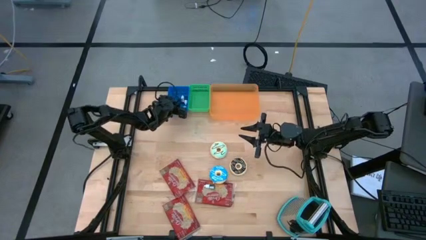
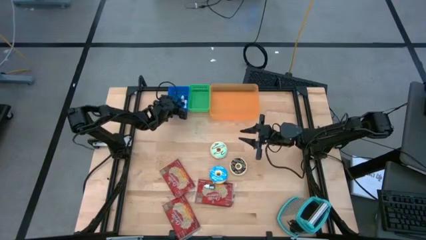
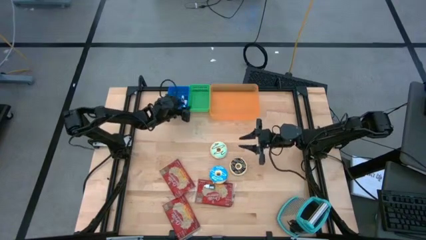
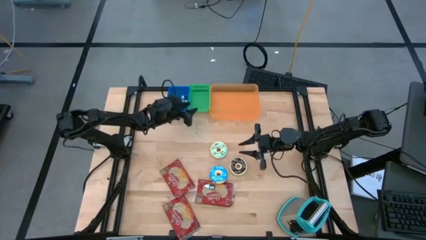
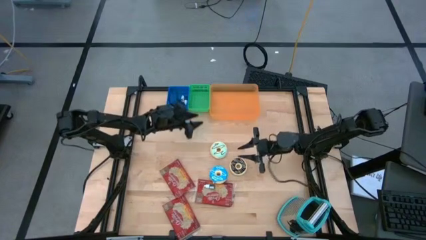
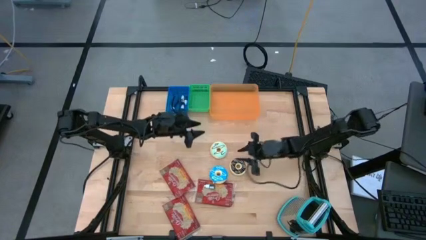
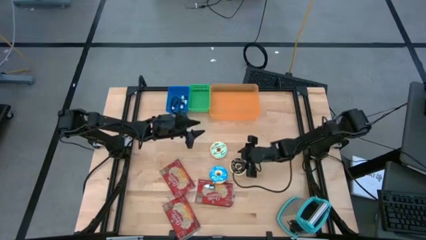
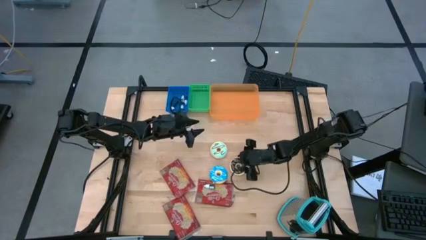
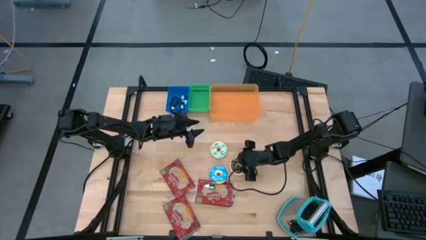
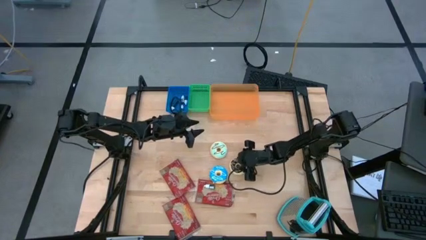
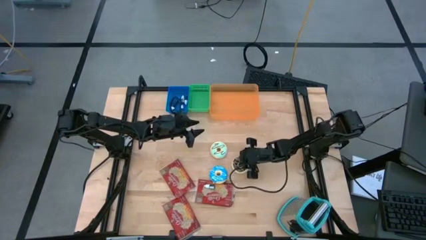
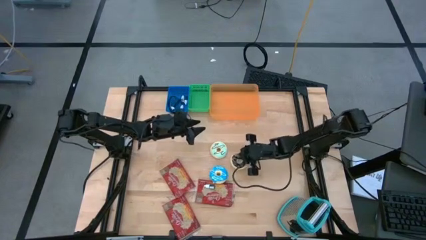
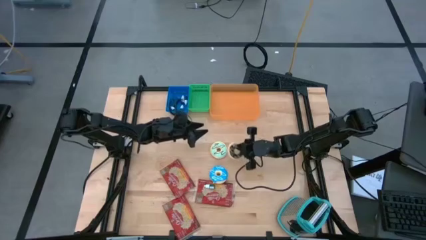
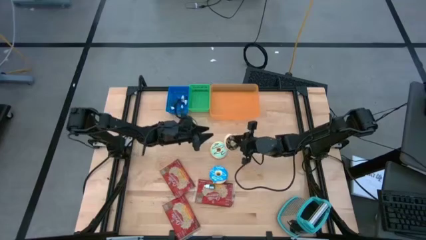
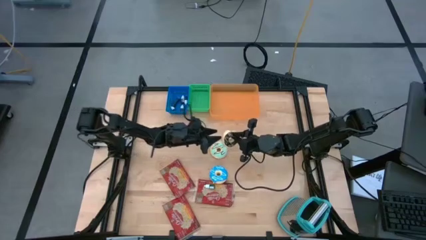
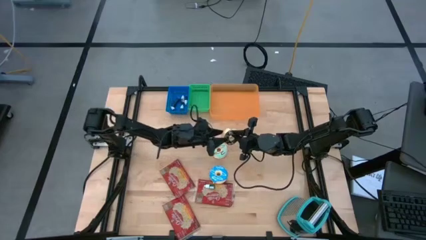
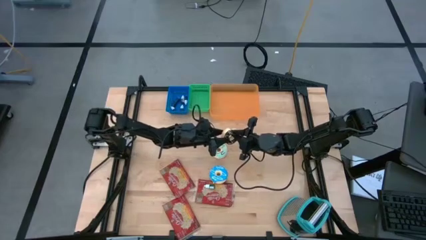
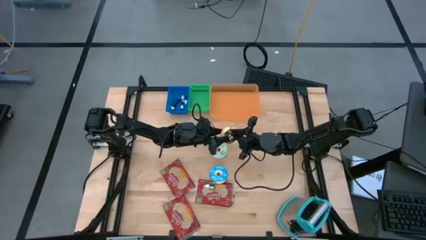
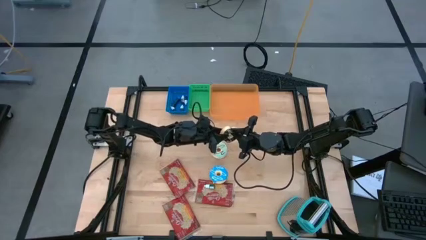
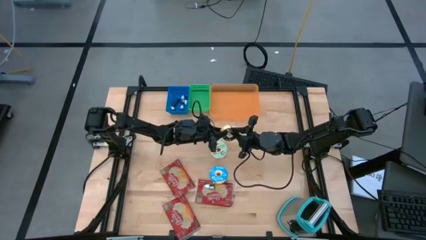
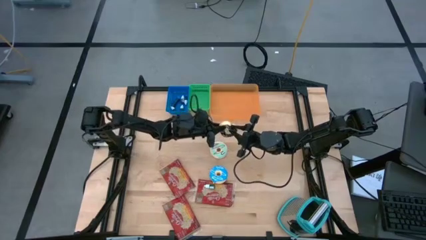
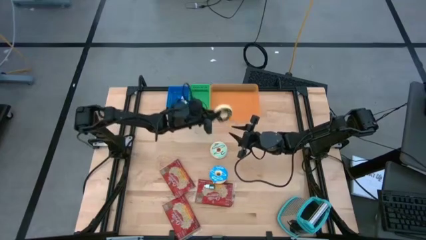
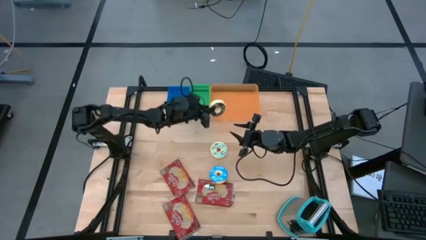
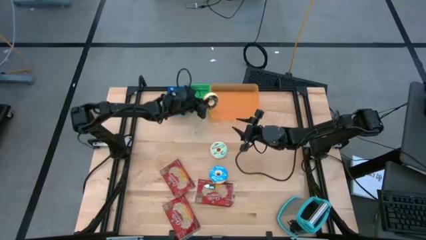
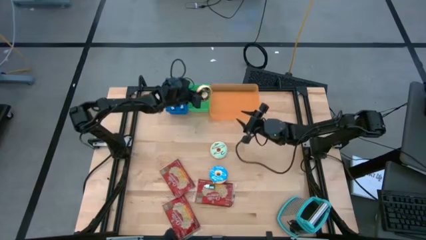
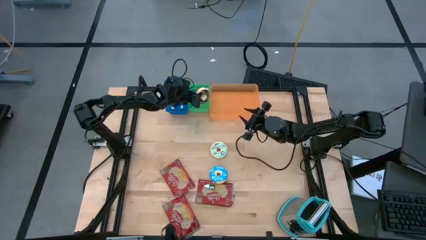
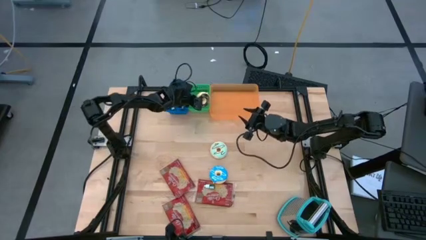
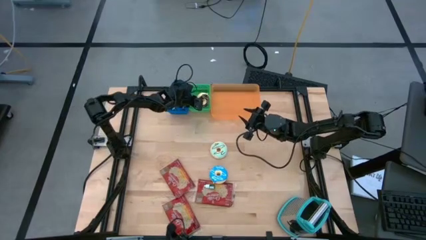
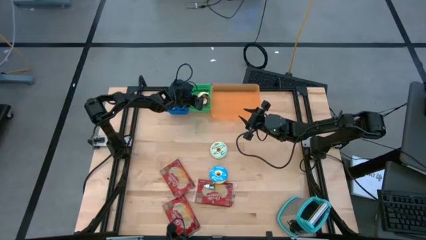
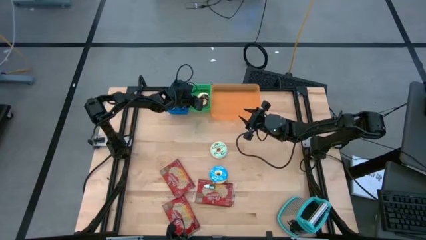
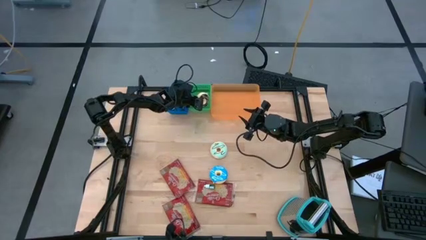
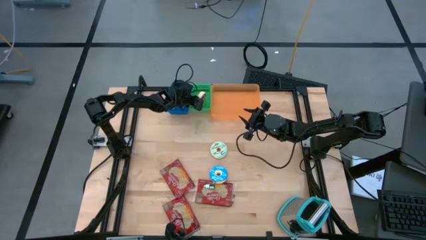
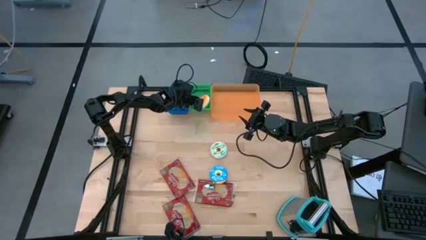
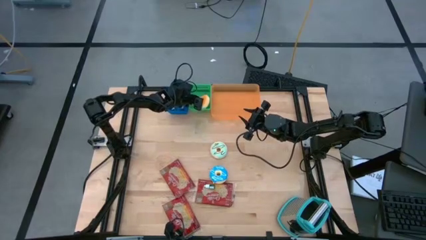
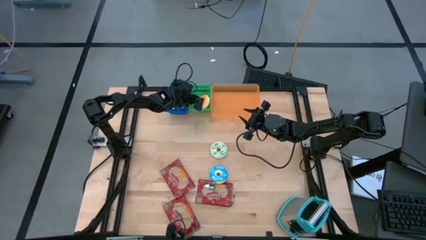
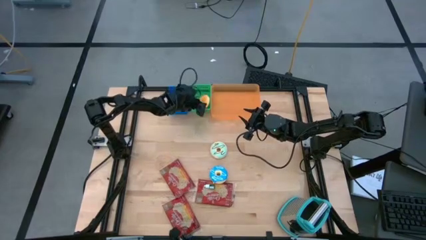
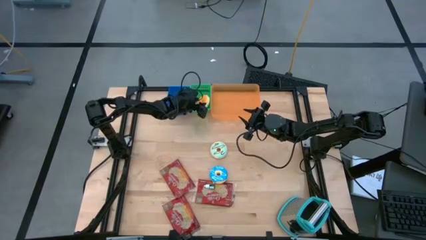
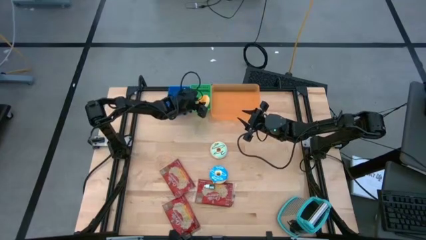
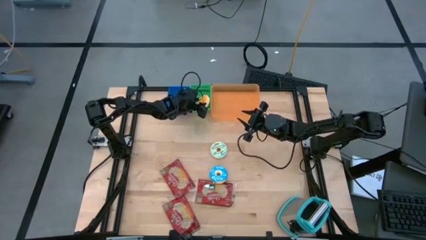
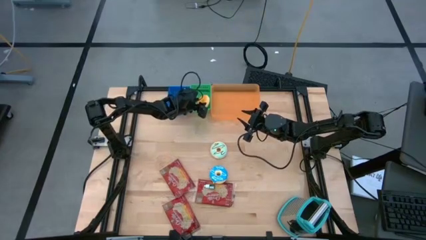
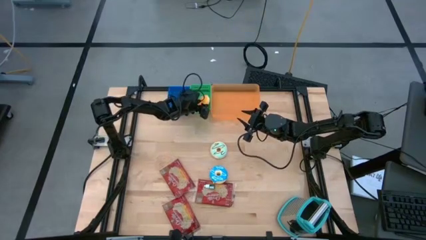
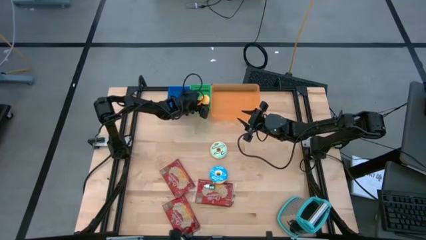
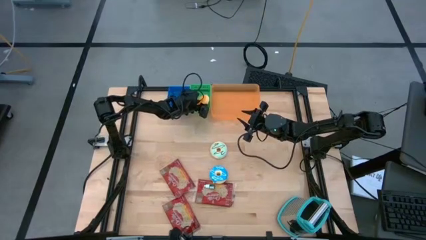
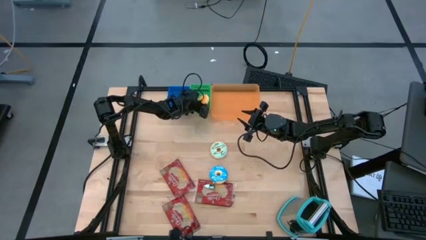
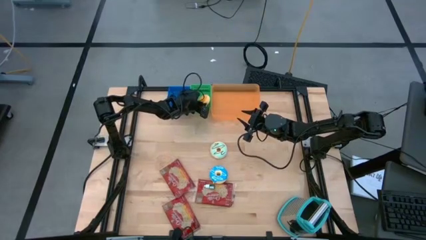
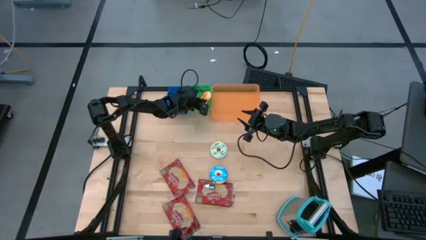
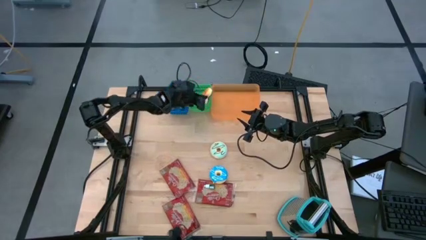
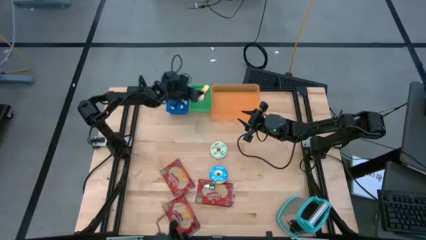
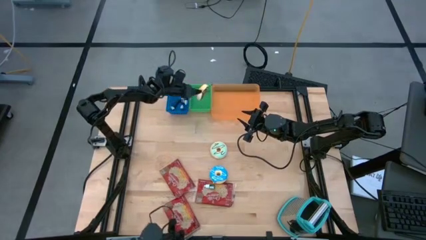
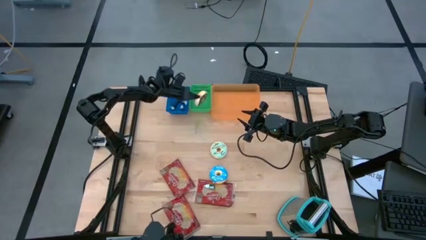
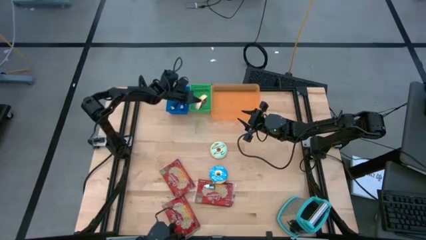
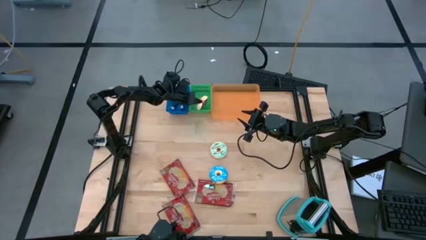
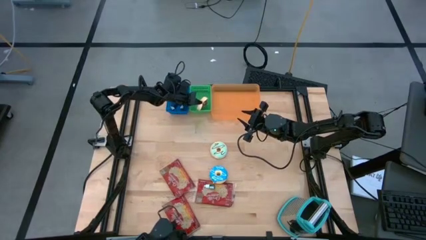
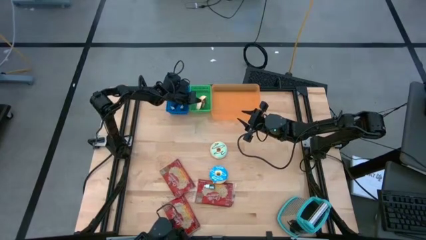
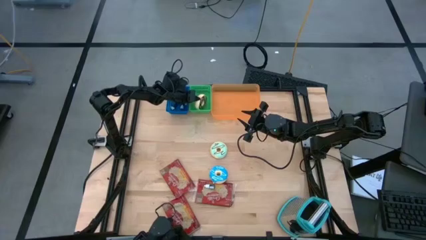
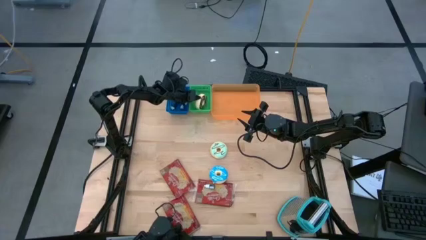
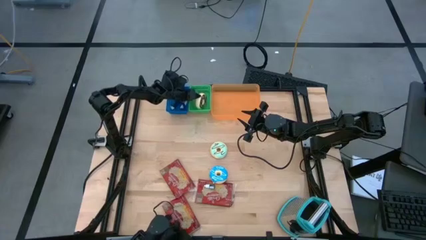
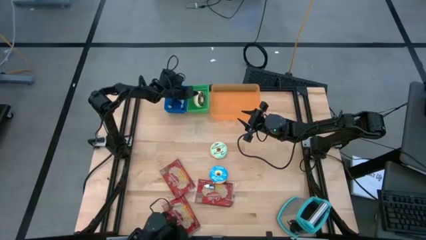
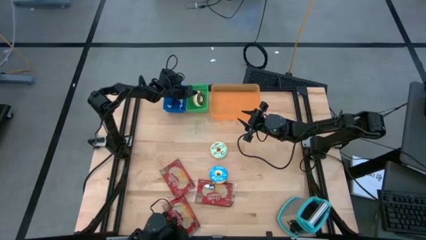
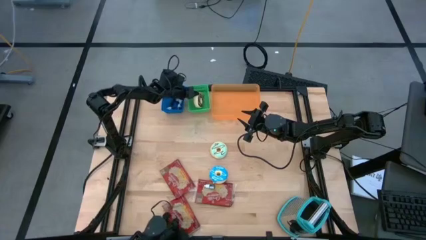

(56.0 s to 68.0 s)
Put the black donut into the green bin

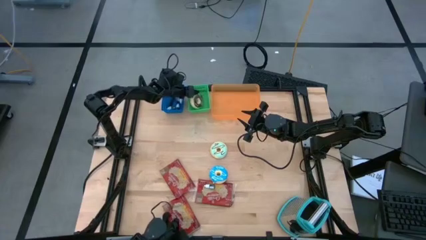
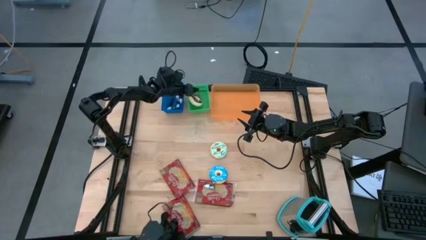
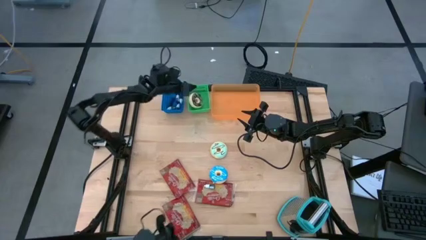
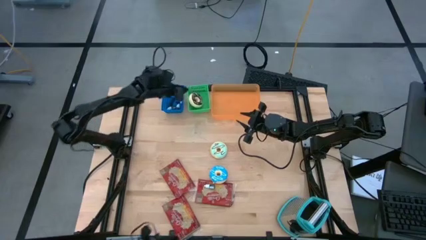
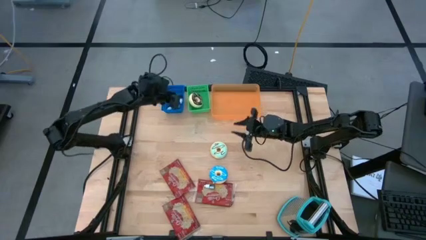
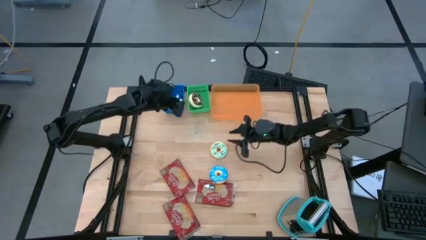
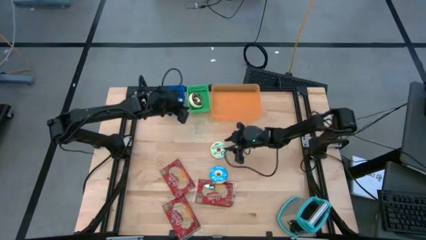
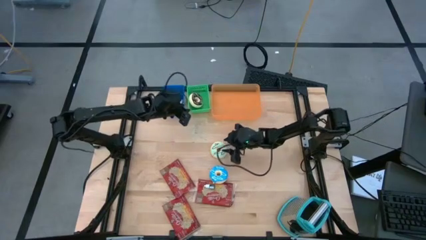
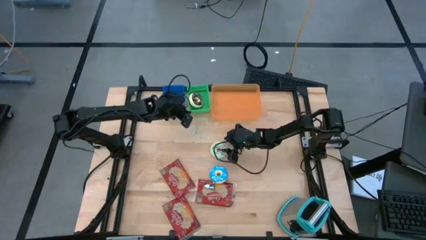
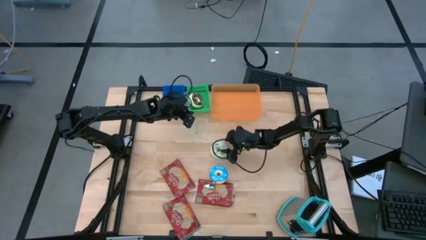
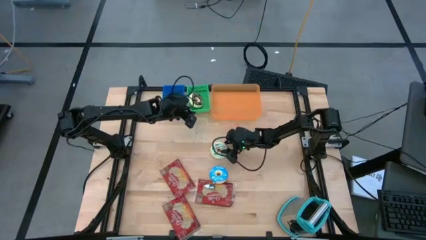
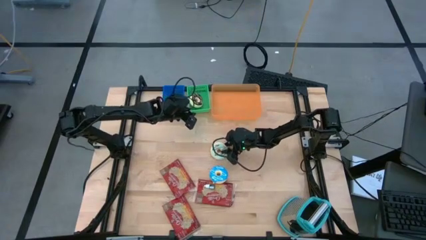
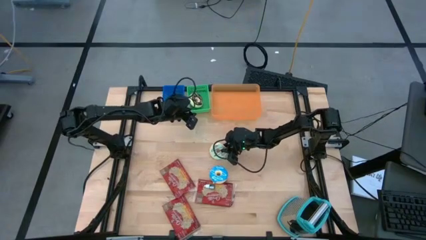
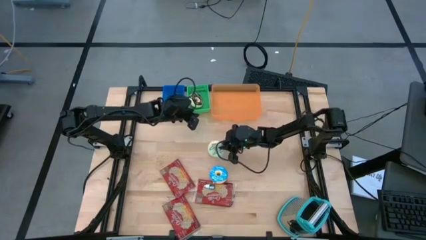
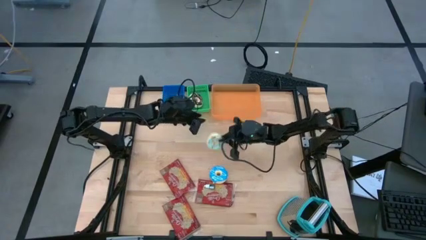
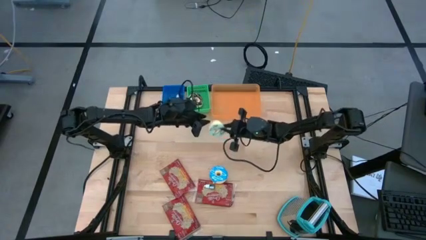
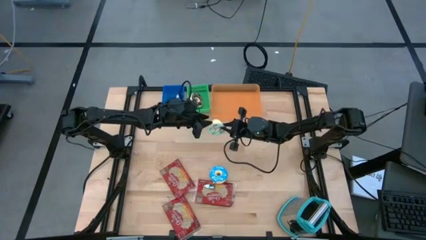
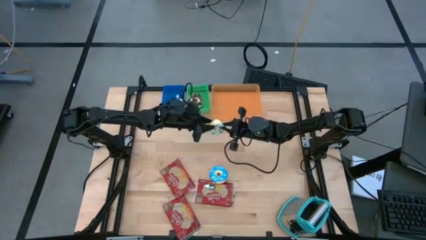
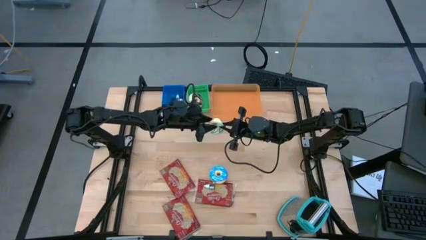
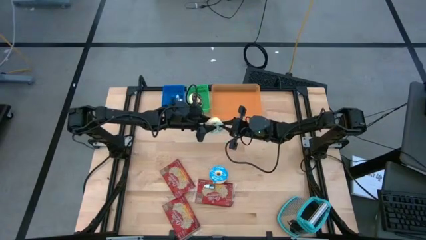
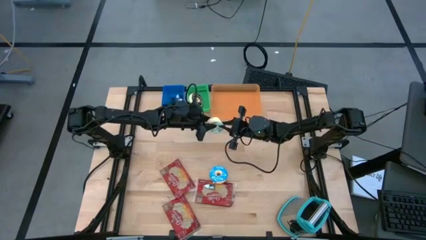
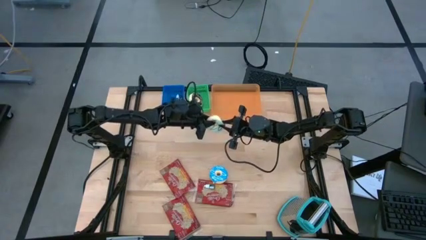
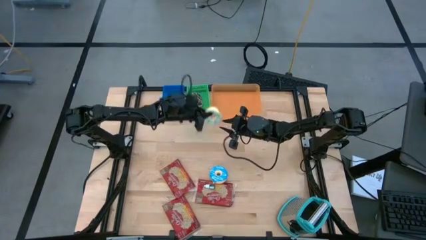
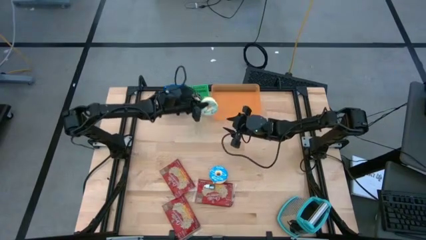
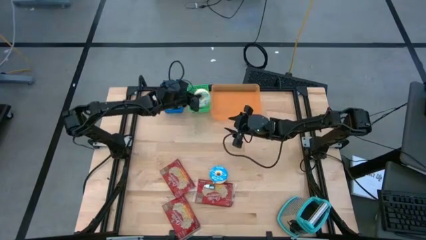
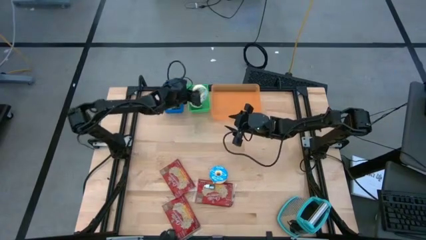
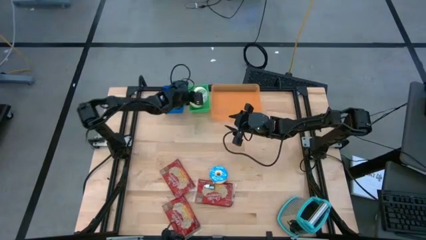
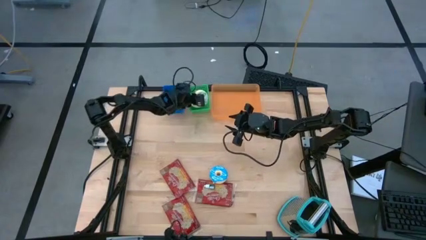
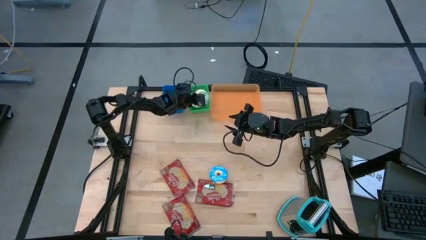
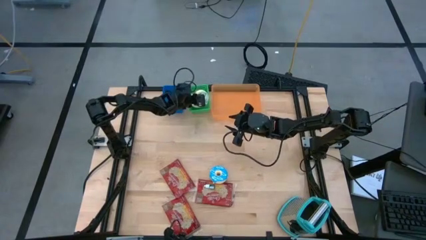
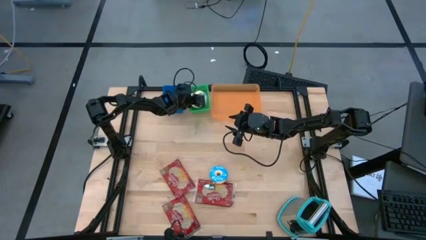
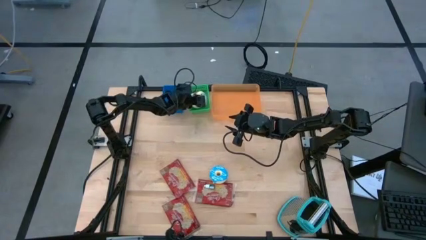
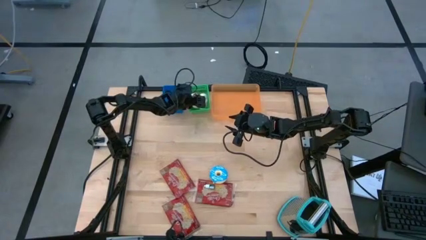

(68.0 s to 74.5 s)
Put the light blue donut into the green bin
